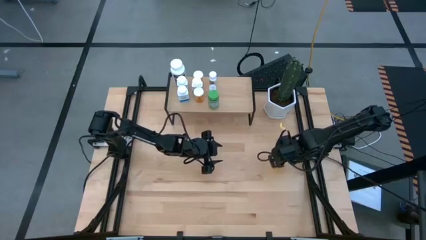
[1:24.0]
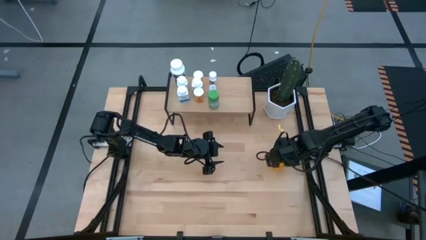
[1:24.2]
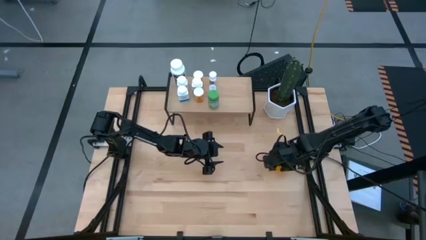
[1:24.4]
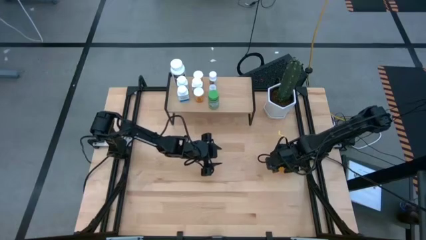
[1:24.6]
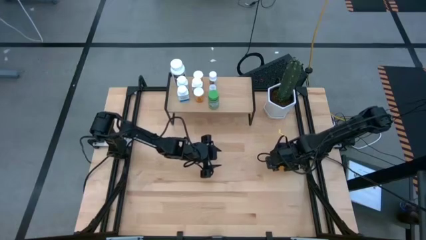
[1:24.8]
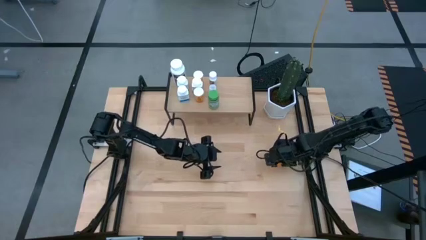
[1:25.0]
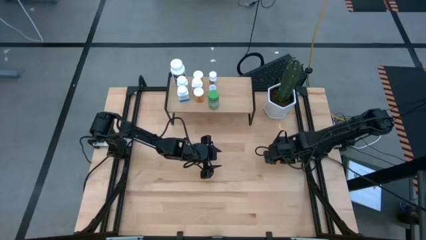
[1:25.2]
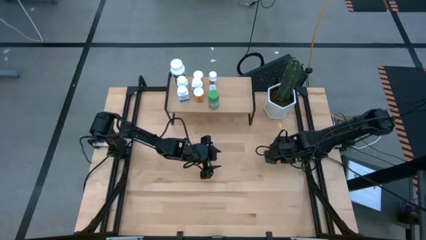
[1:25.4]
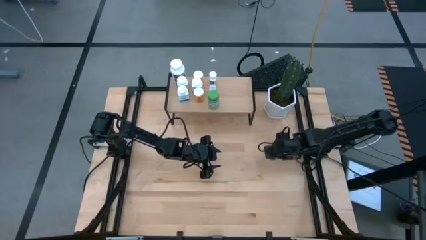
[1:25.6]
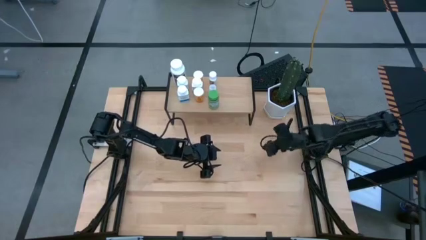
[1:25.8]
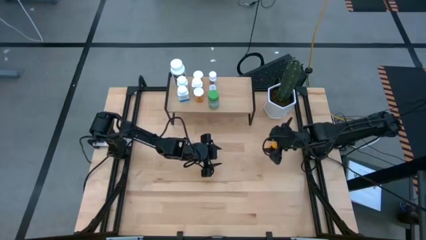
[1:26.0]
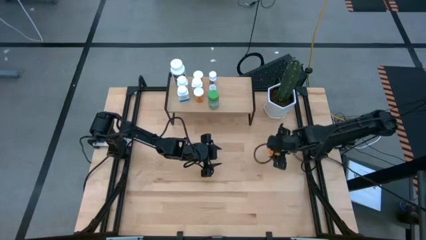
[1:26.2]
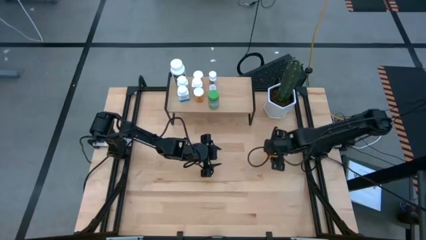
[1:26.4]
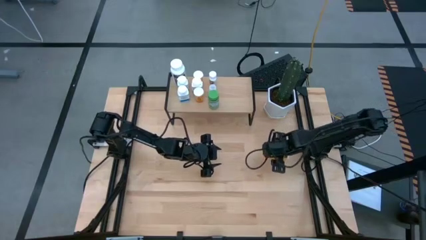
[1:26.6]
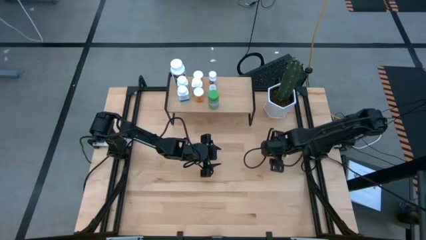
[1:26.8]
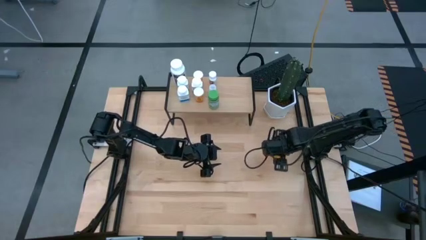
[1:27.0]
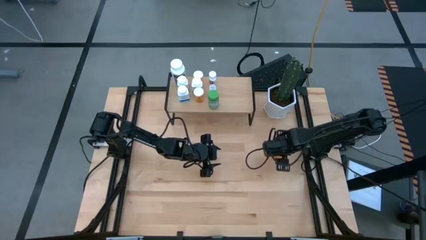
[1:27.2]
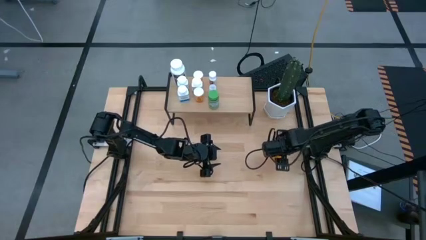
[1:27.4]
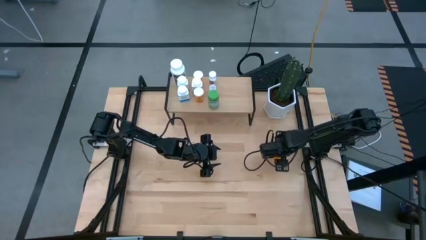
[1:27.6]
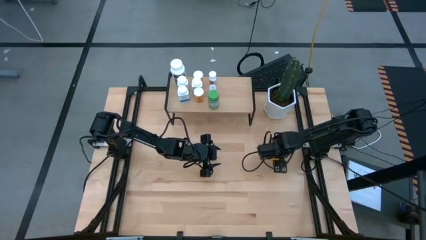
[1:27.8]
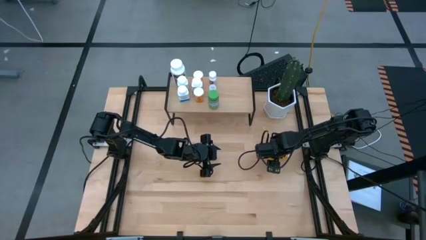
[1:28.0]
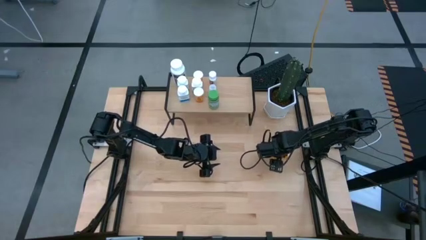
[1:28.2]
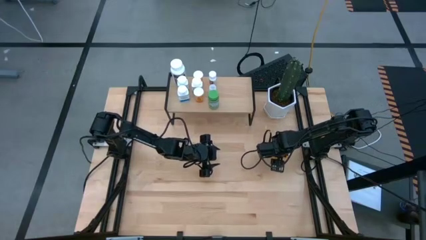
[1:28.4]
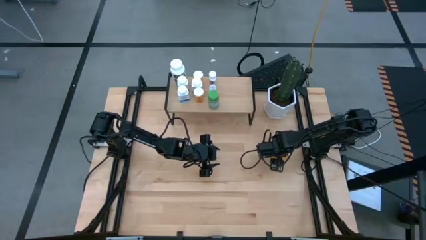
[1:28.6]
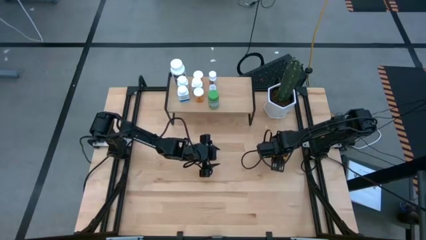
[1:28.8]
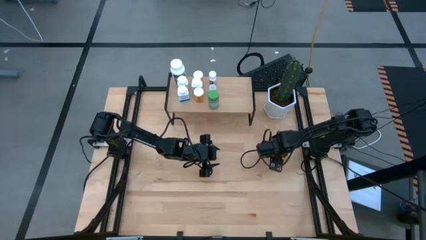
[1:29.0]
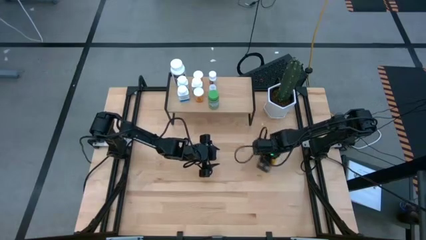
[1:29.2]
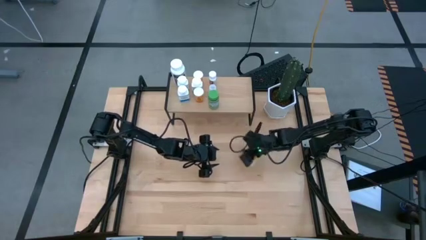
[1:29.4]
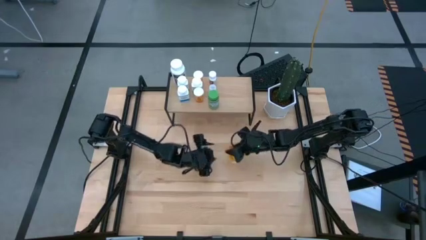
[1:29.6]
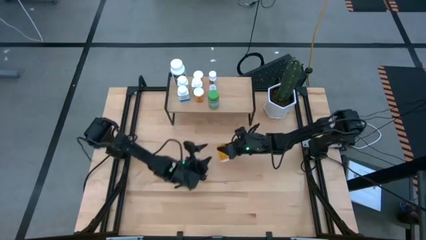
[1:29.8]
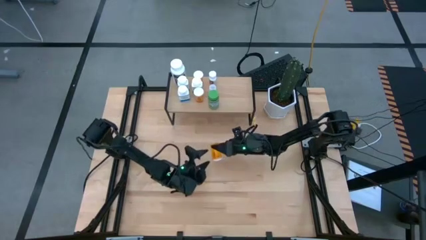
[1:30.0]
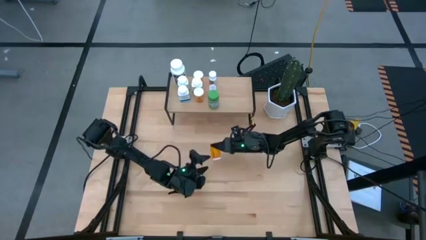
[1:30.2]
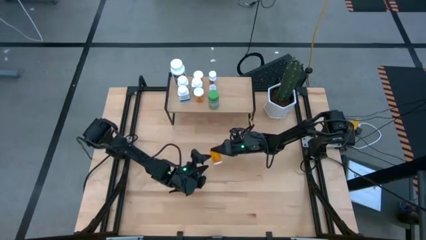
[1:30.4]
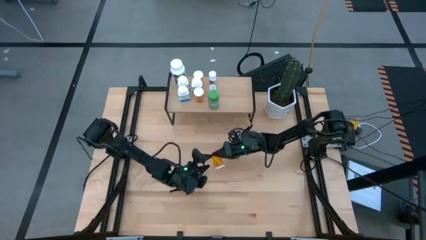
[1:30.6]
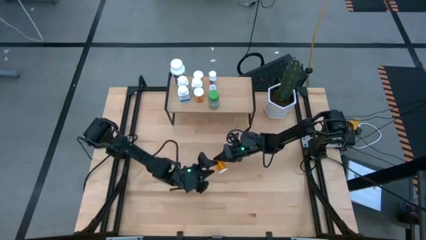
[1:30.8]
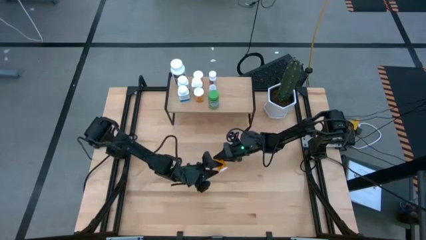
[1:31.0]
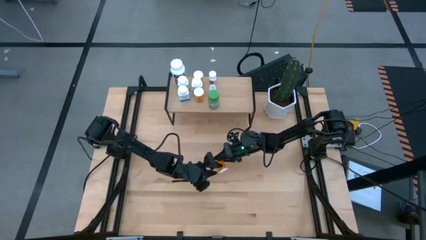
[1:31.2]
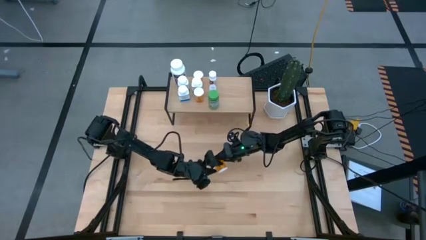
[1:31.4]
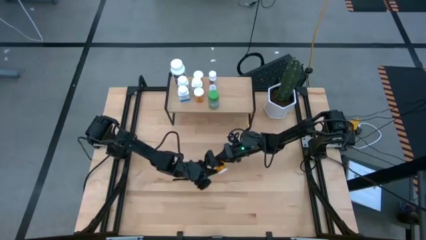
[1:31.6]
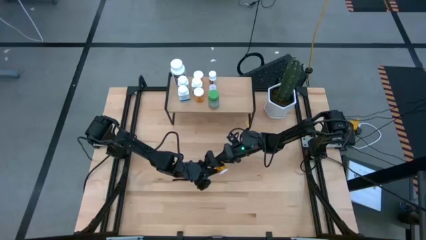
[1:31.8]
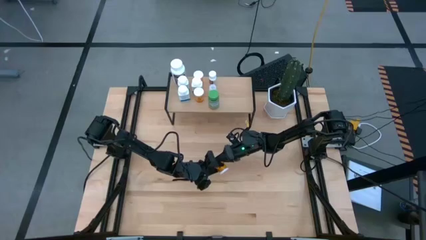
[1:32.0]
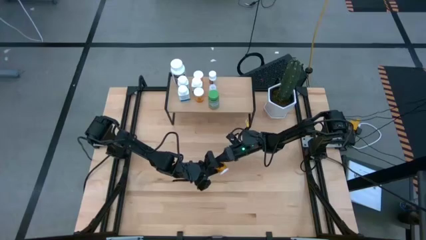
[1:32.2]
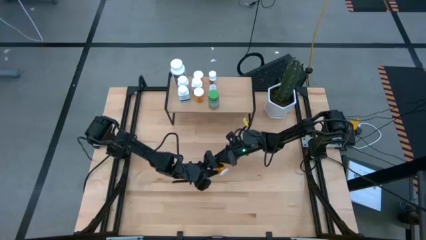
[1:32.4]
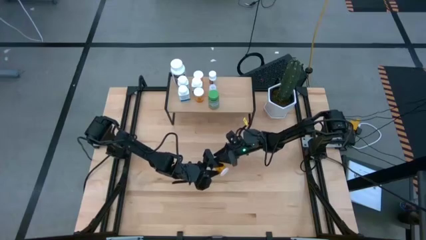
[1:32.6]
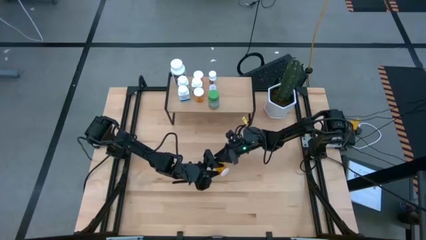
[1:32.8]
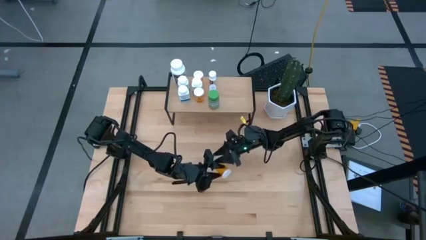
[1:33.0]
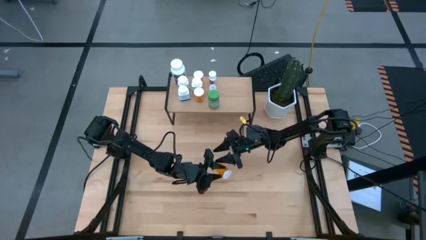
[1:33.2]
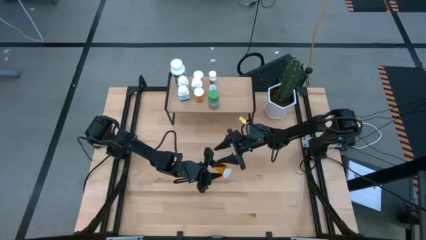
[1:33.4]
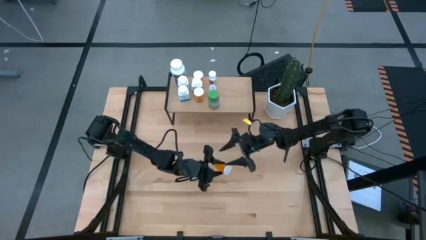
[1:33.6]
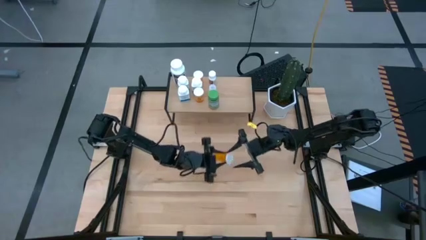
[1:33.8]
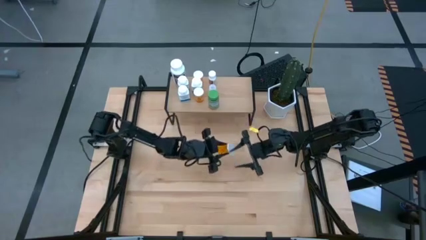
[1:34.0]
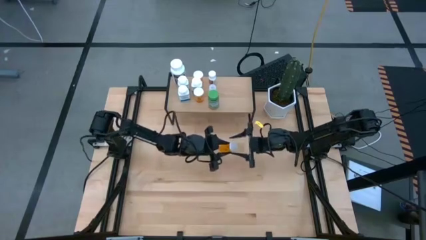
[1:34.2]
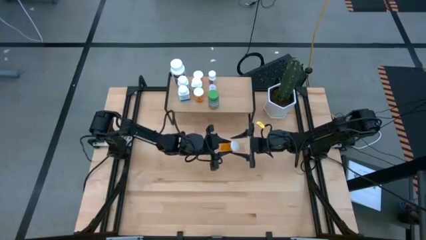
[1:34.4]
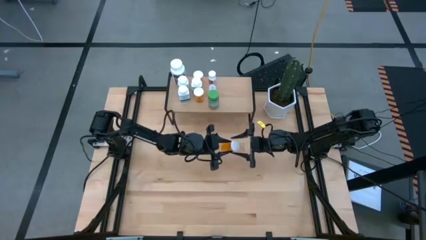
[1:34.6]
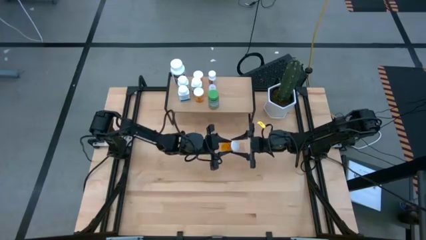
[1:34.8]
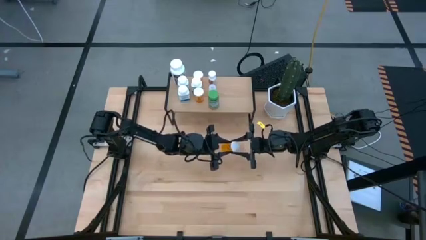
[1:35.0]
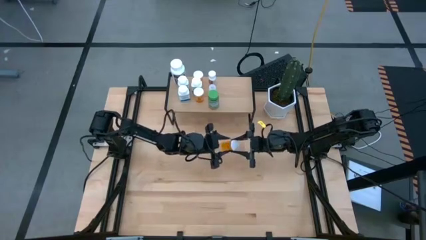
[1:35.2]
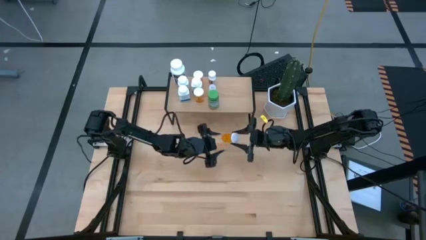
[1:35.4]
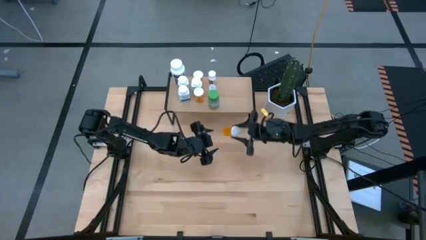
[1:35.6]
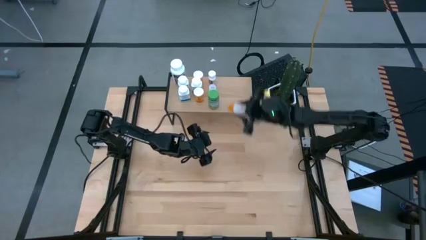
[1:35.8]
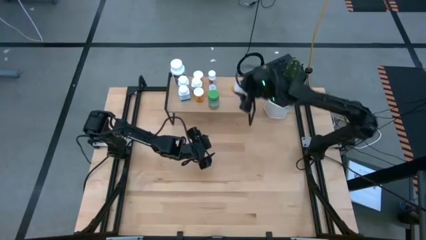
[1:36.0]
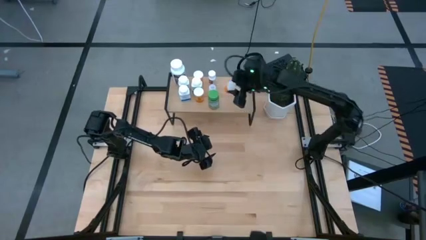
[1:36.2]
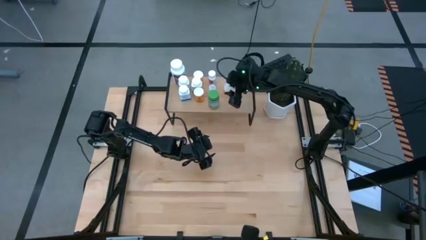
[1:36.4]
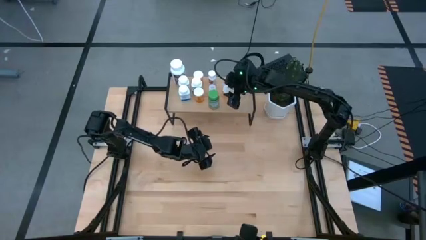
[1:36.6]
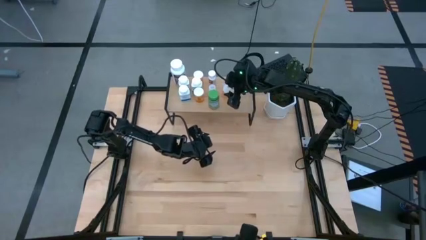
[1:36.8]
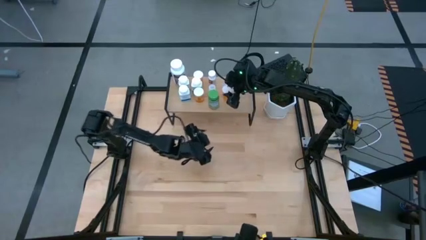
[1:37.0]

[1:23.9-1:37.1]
Task: Pick and place medicine bottles onto shelf by color
Put the orange pill bottle on the shelf

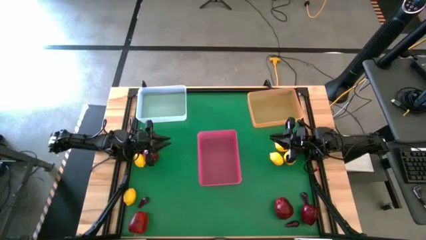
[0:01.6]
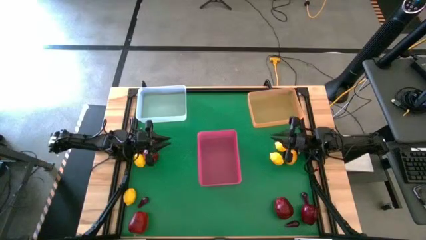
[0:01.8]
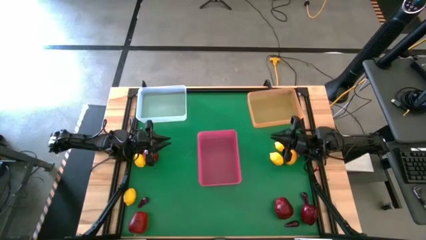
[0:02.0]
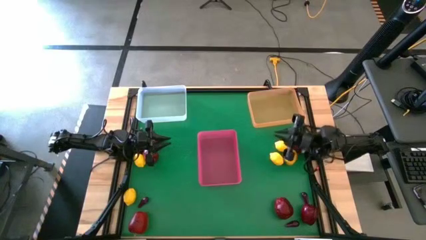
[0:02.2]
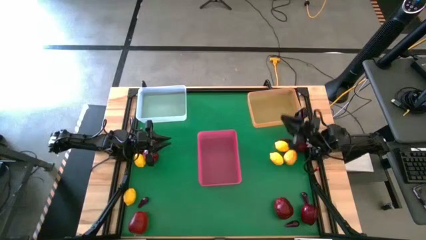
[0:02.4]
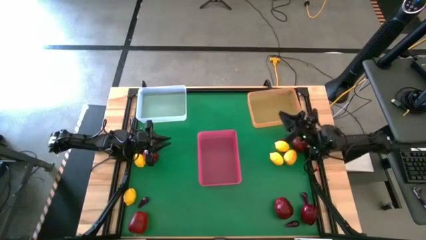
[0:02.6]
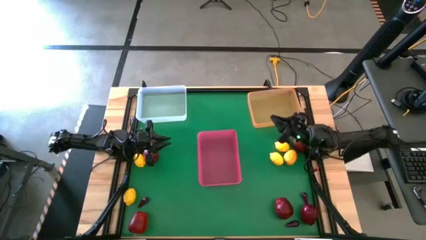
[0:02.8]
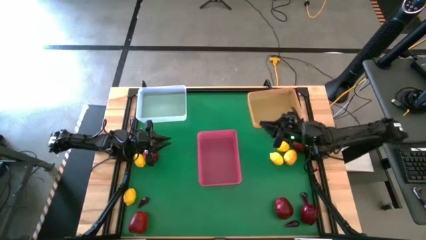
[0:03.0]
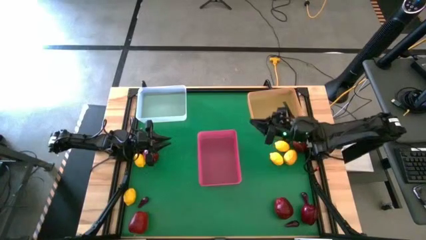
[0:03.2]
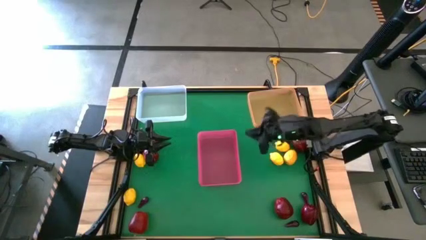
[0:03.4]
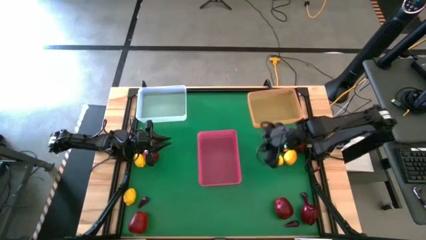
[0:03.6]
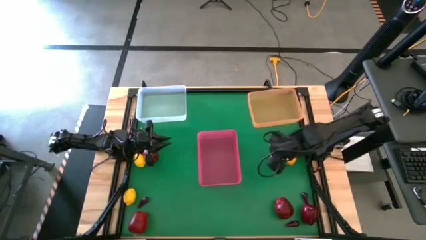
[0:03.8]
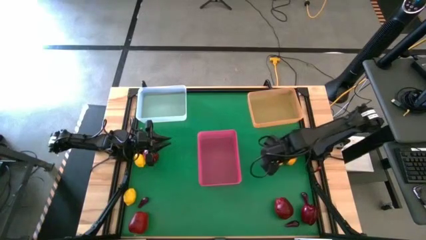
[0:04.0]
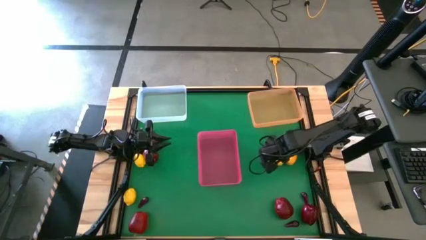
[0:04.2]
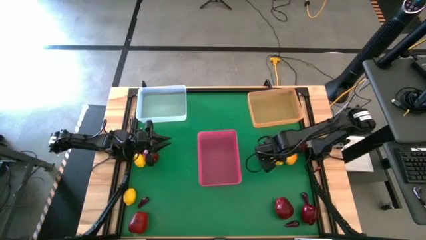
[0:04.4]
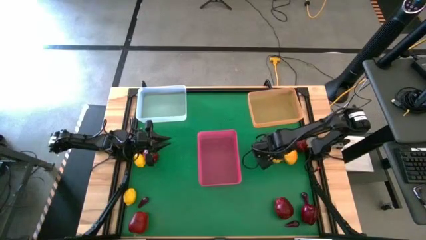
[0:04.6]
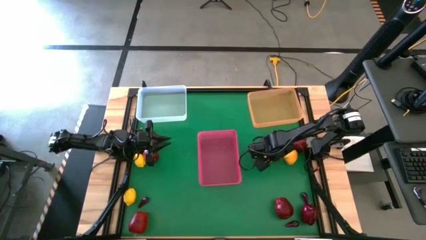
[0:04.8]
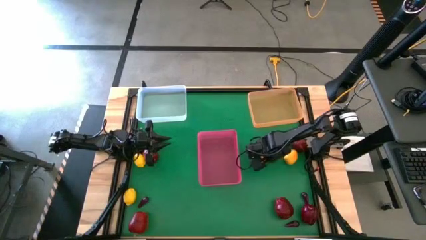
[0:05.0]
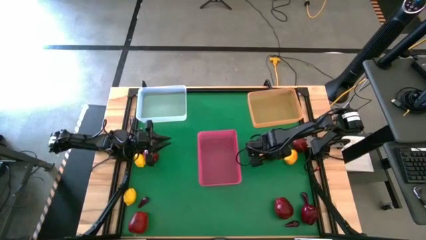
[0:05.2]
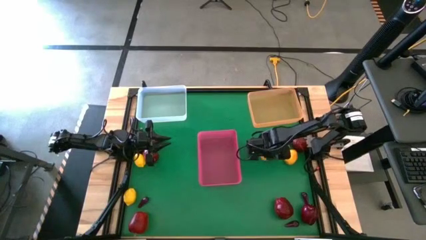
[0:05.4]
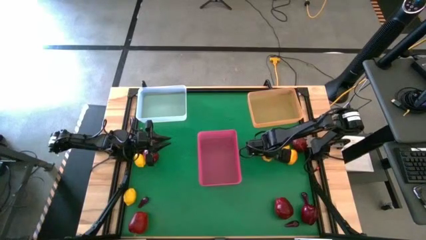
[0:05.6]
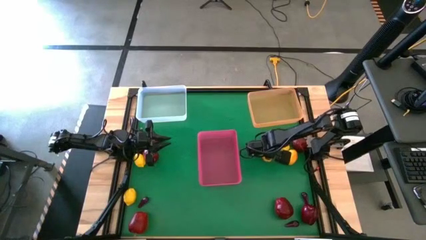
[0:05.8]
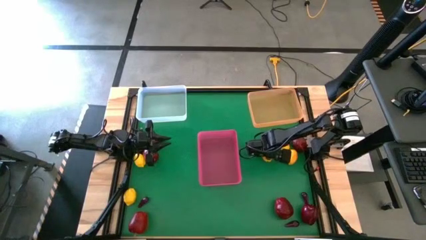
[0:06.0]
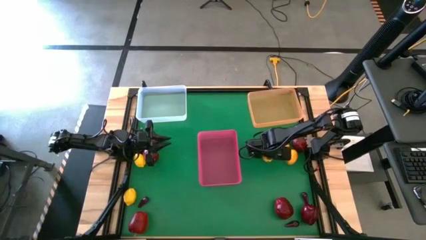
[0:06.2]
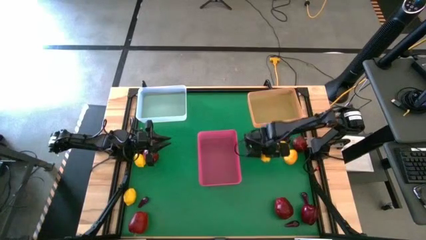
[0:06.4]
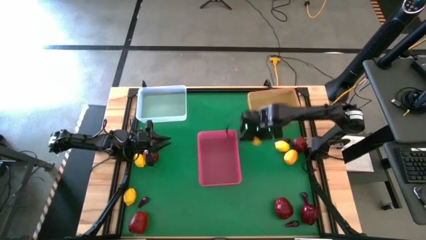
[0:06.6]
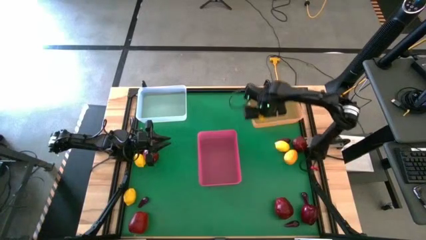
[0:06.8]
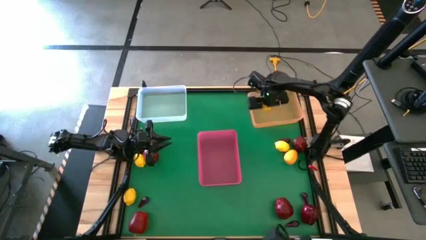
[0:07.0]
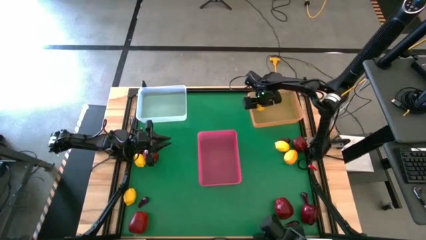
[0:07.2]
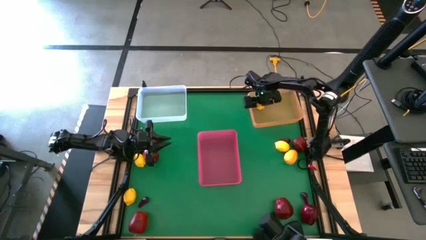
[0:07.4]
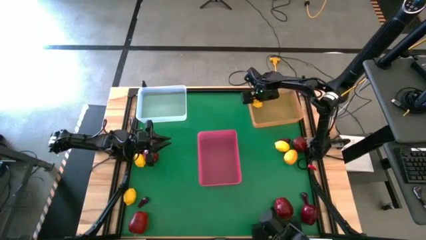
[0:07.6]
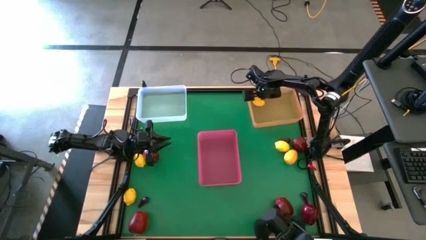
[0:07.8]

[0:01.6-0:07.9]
Task: Sort produce into baskets
Put the lemon into the orange bin
